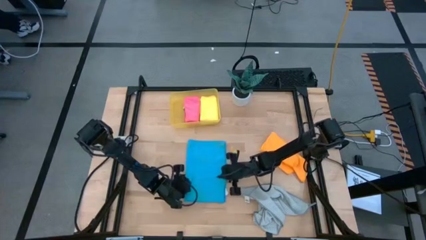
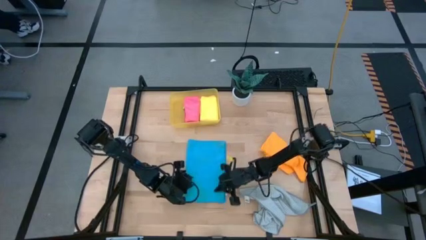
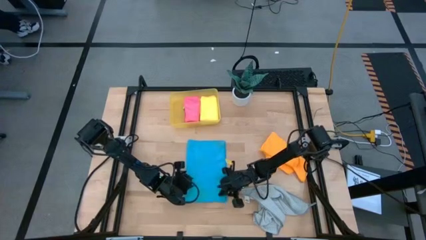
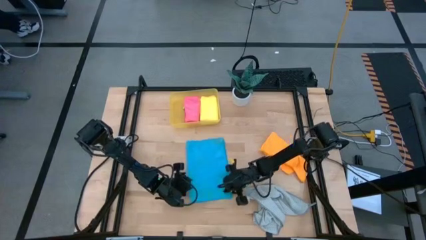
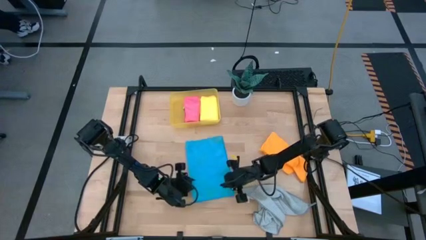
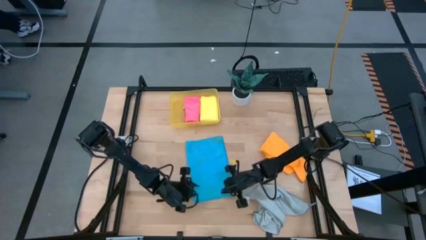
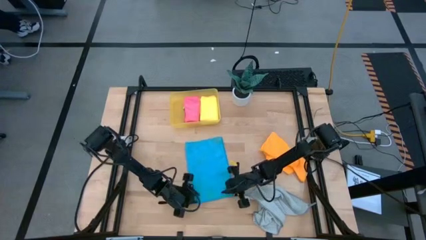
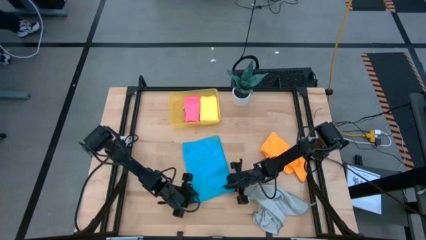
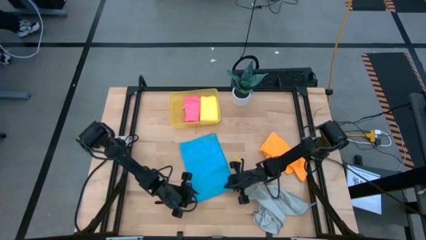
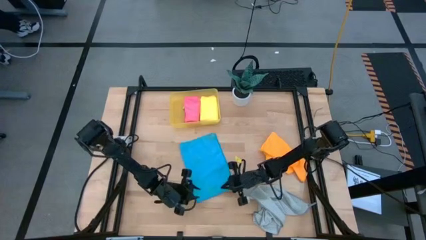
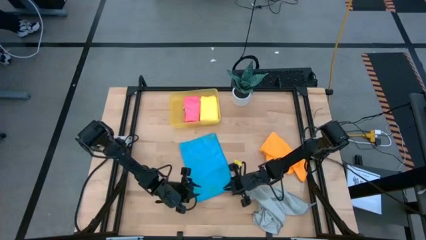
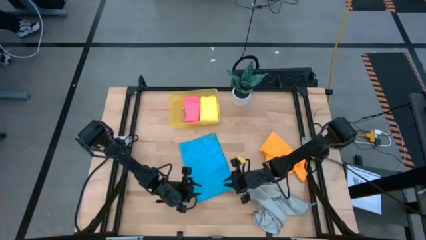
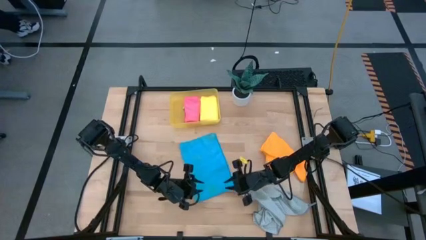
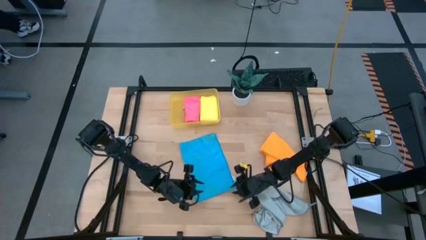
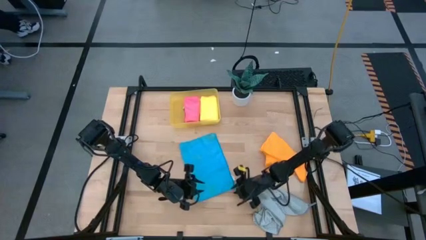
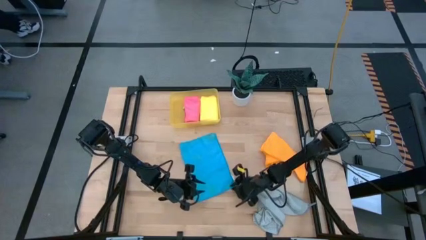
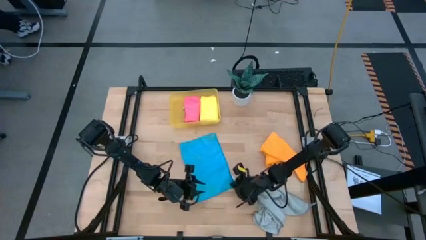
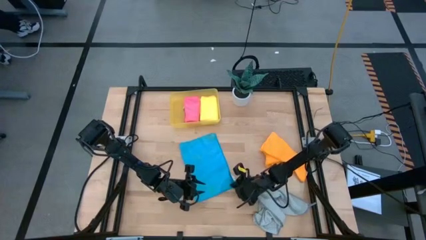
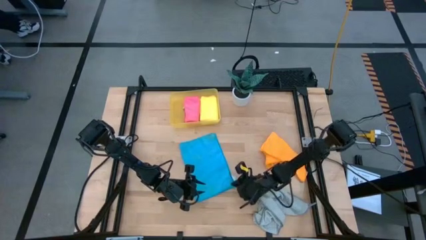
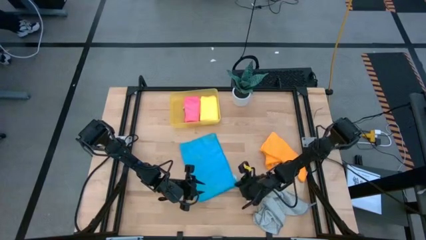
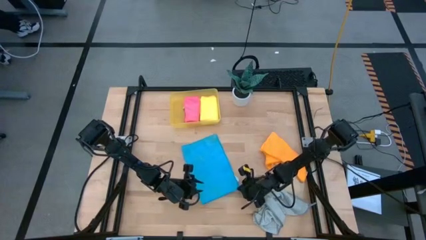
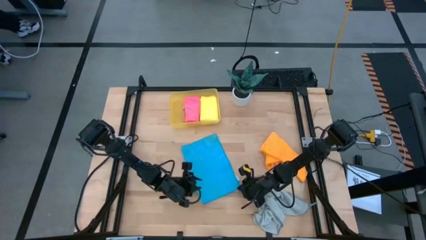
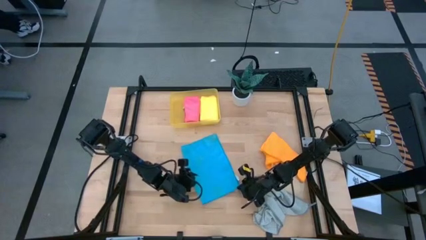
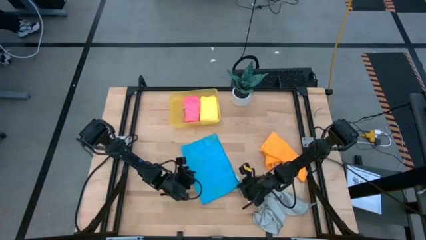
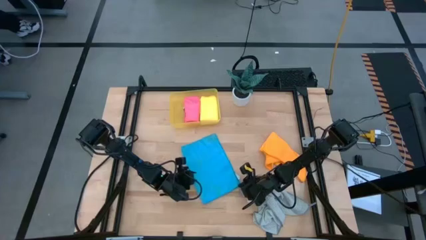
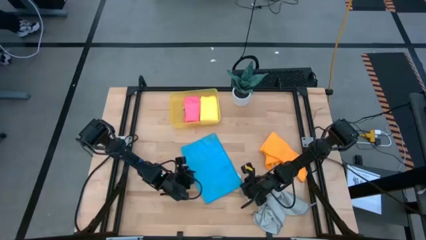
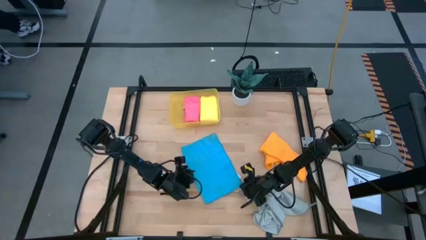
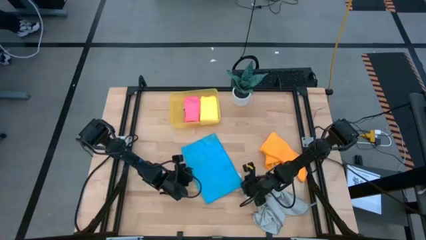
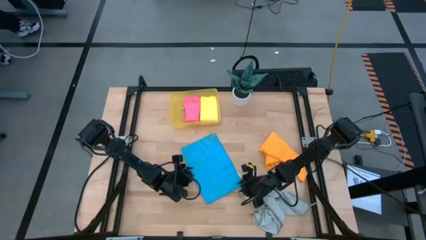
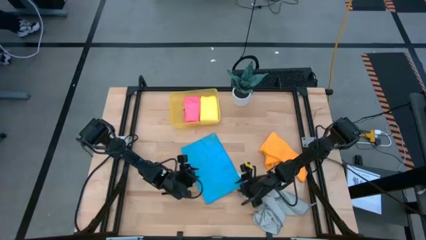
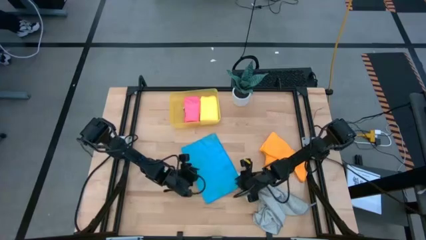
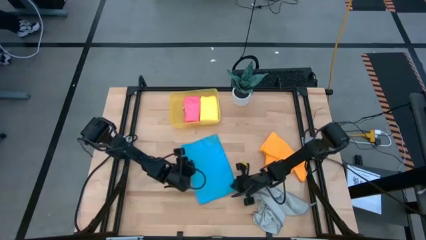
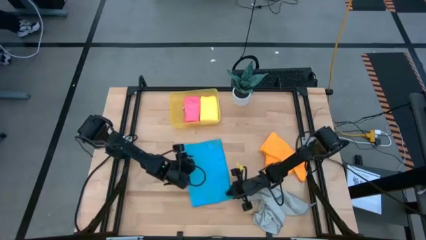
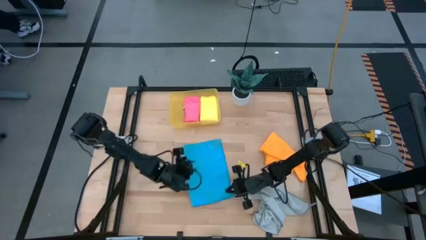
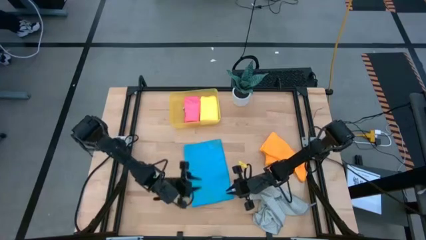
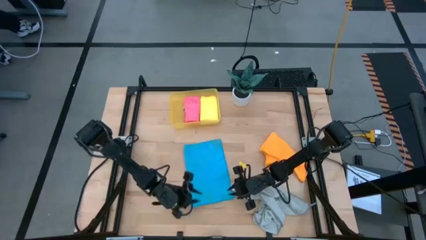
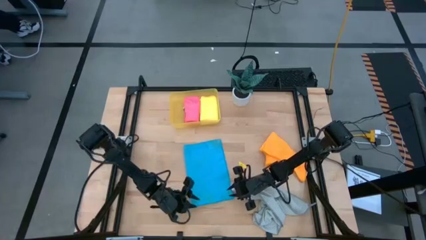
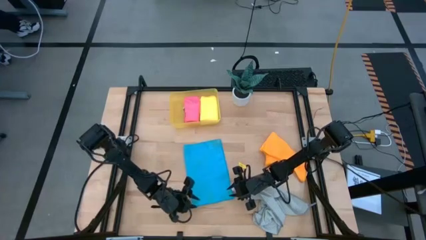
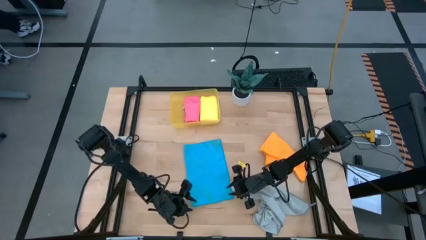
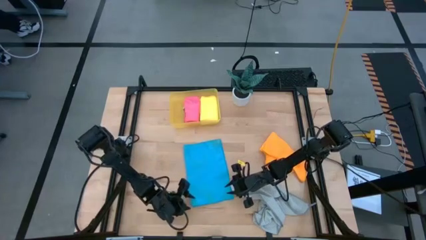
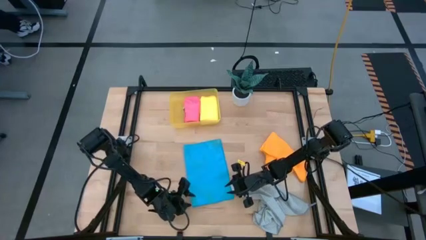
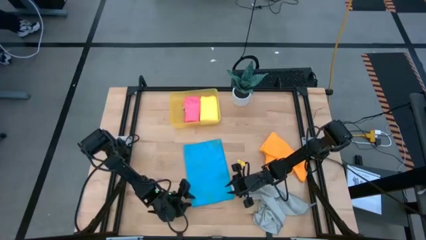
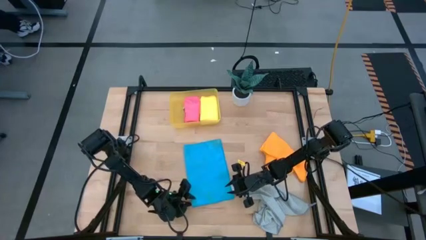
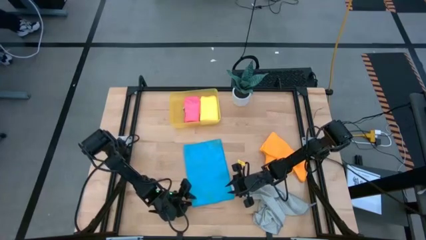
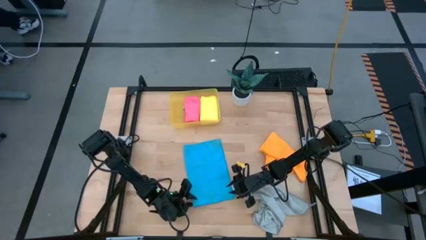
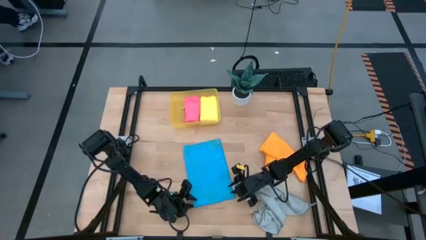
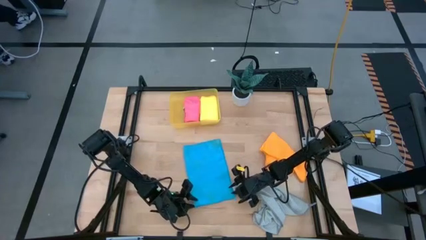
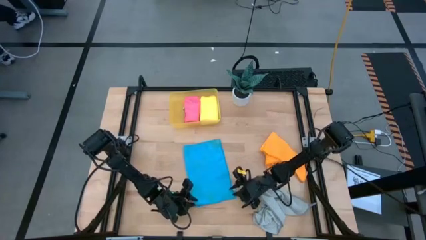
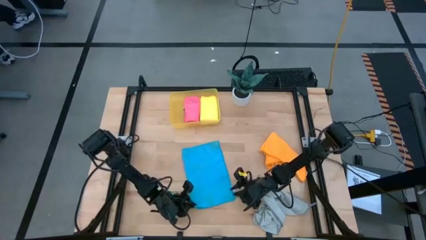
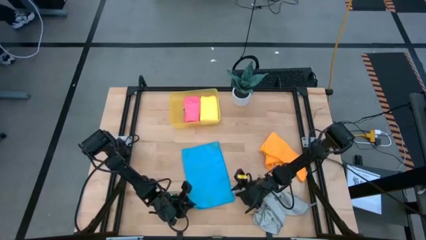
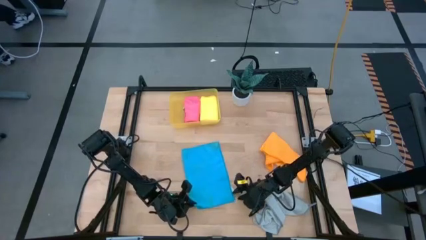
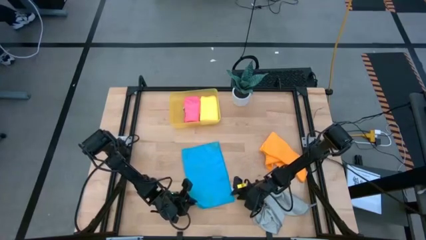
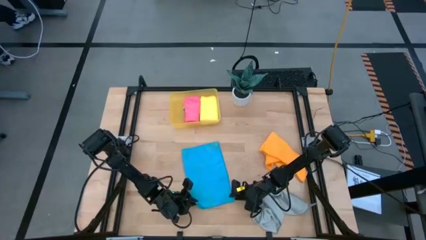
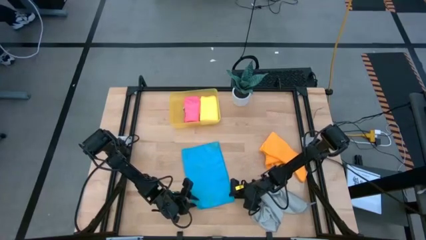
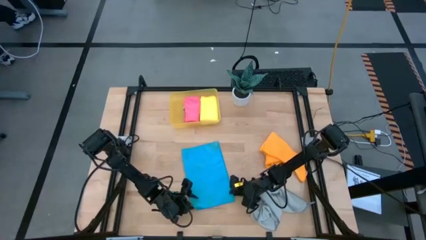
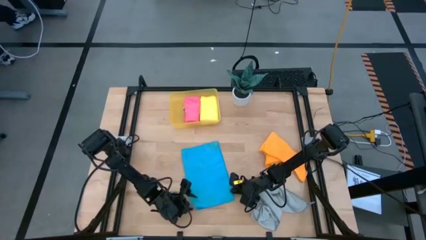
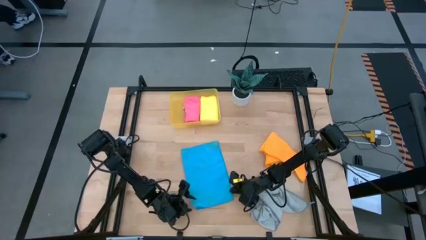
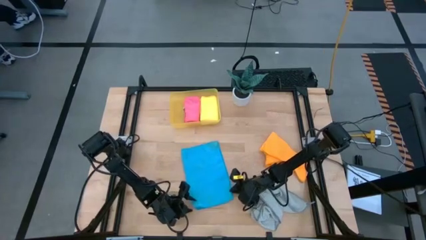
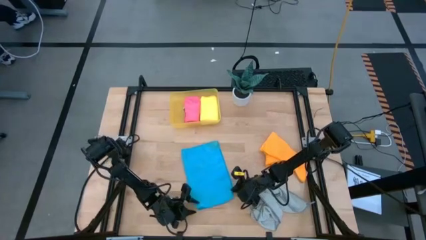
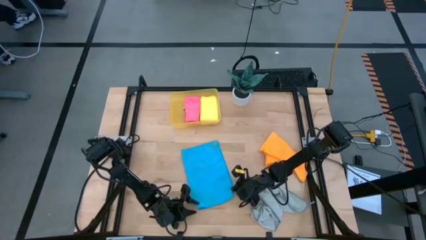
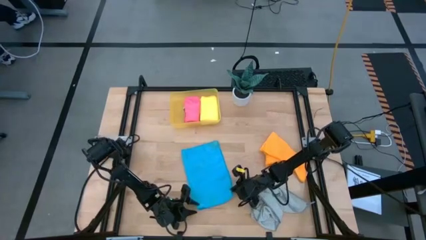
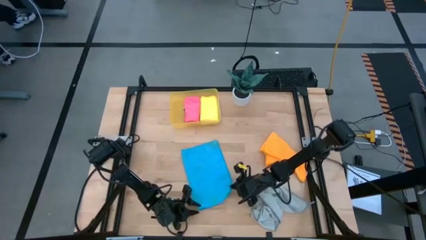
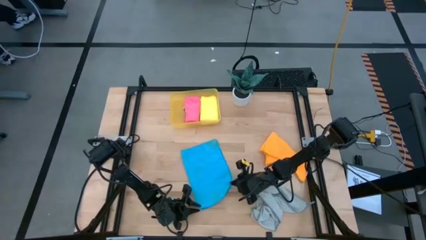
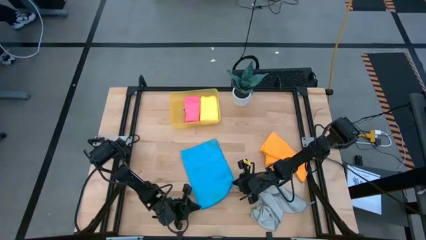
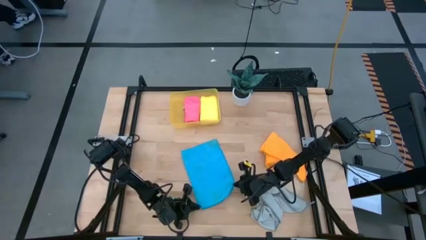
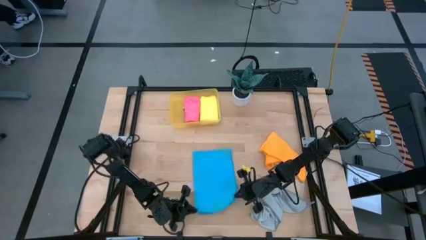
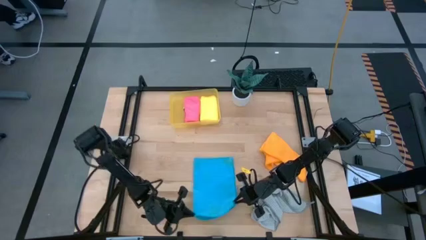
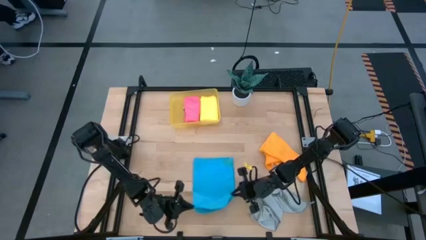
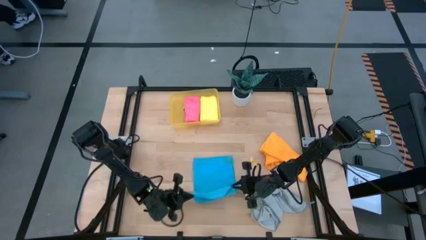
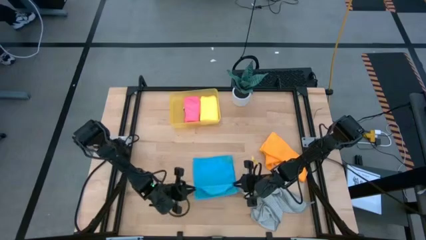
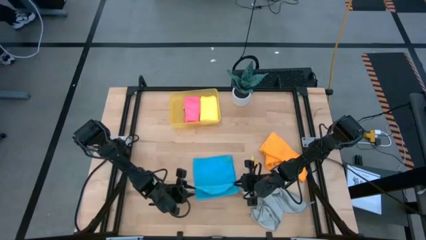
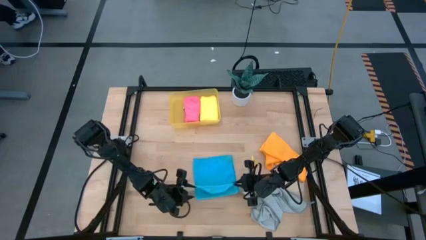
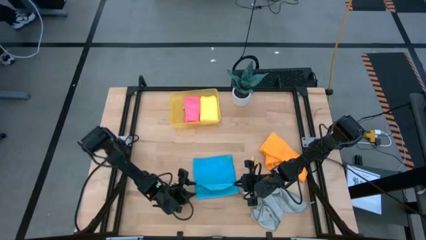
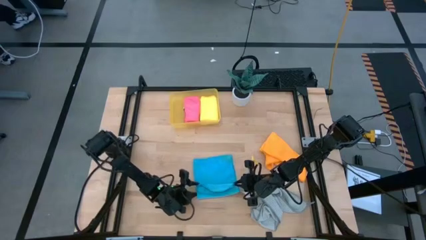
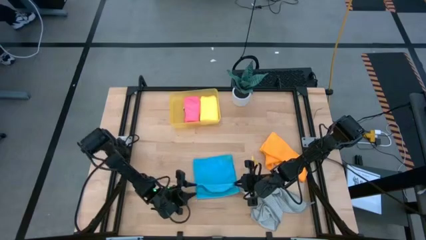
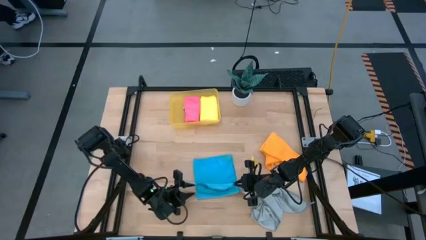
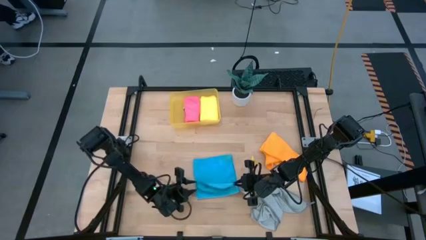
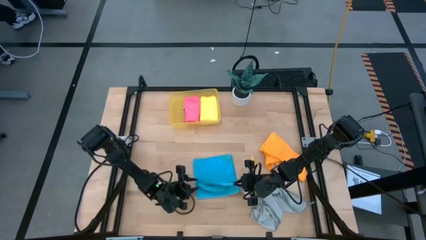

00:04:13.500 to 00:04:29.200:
Task: Fold microfiber towels
Fold the blue microfiber cloth

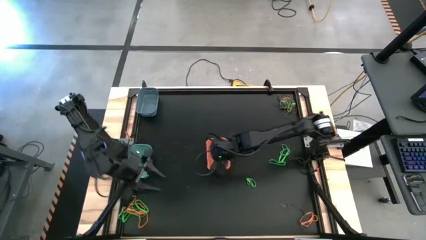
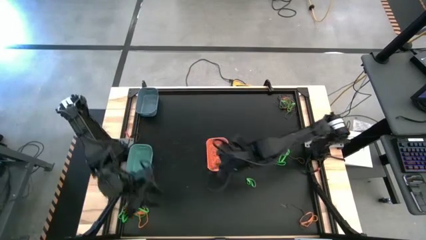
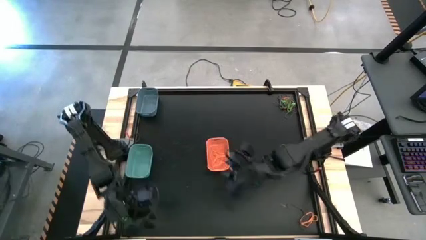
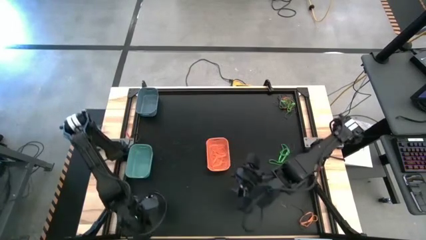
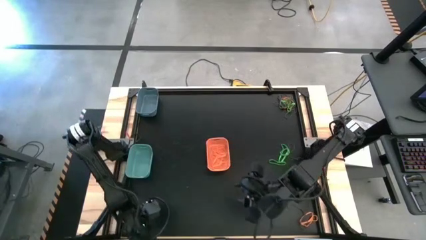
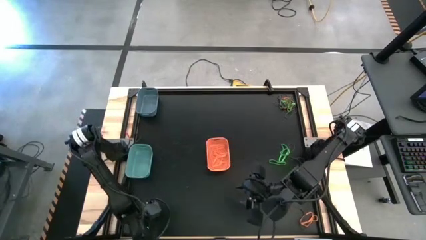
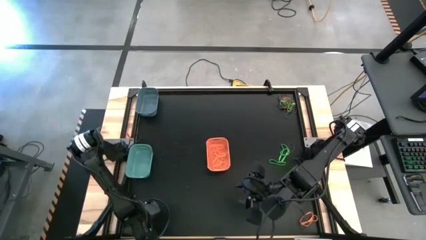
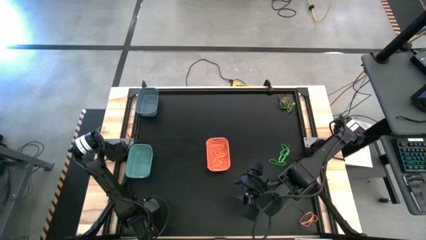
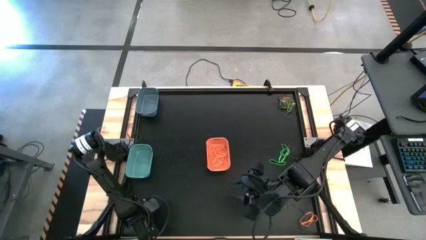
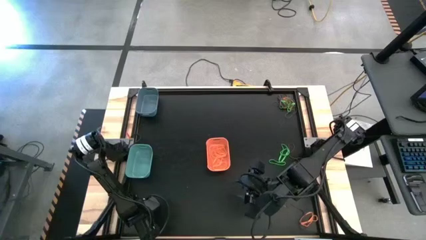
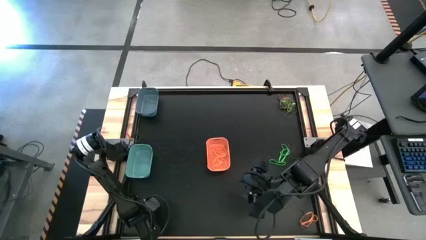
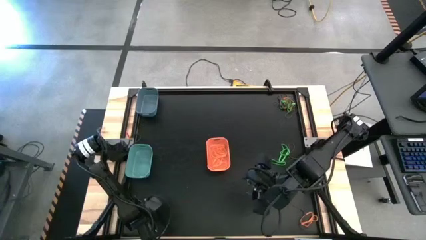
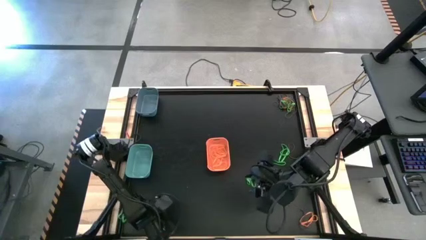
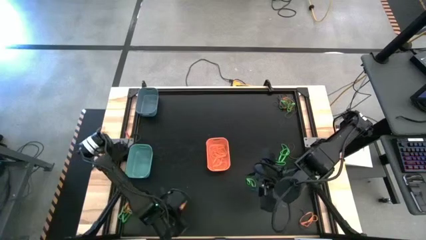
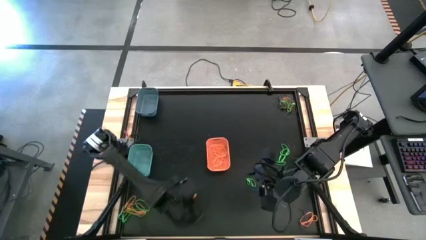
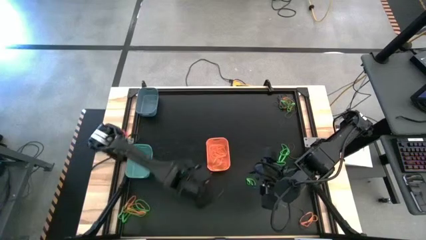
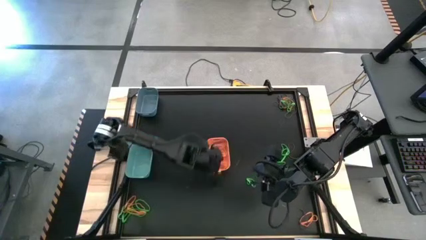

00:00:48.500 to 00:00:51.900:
Task: Sort rubber bands into baskets
Put the orange rubber band into the orange bin
